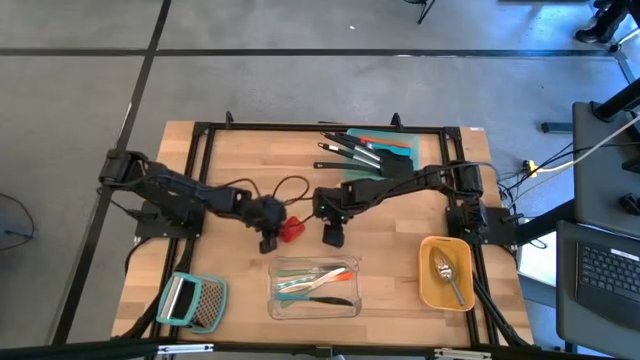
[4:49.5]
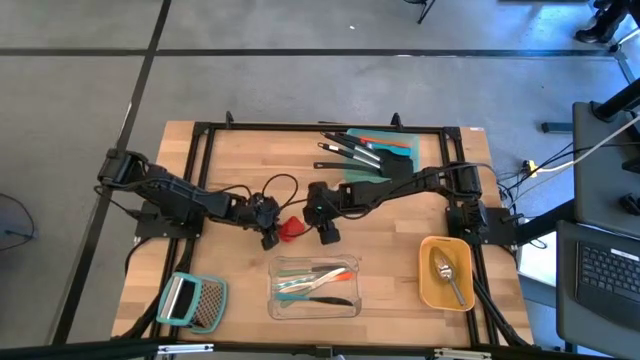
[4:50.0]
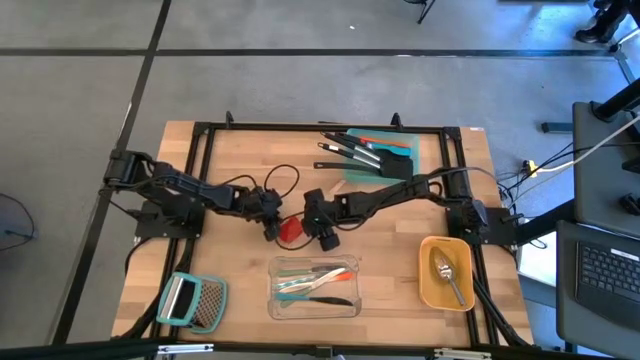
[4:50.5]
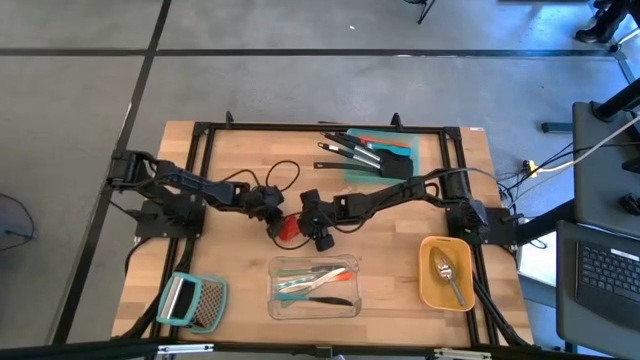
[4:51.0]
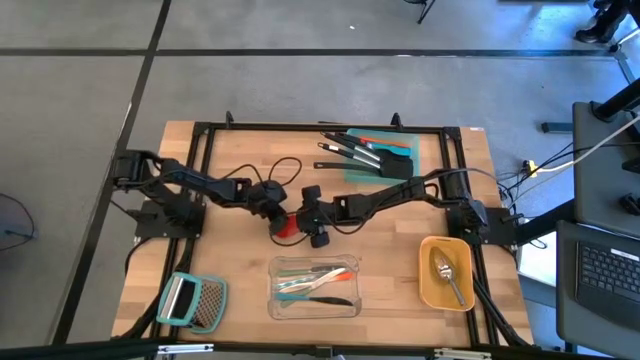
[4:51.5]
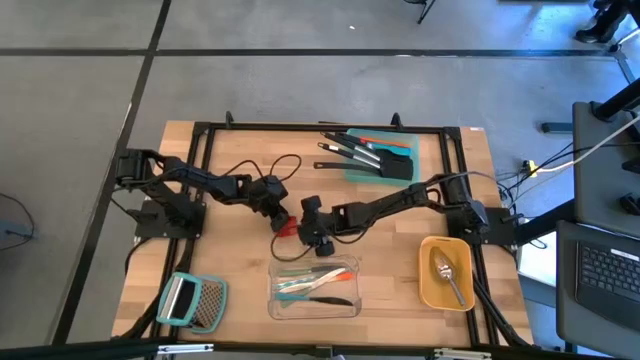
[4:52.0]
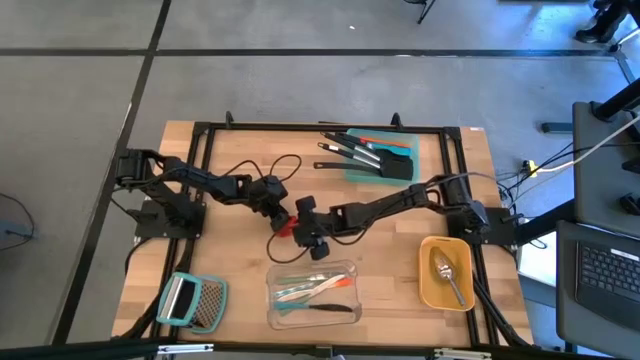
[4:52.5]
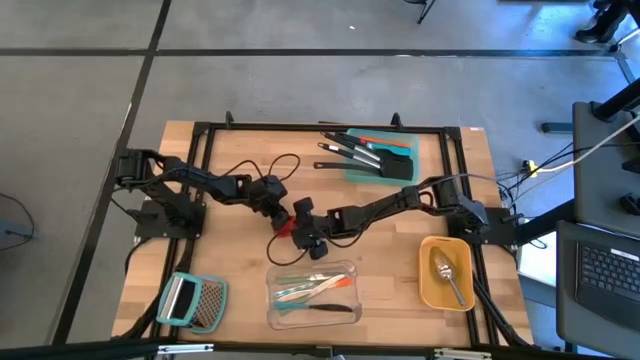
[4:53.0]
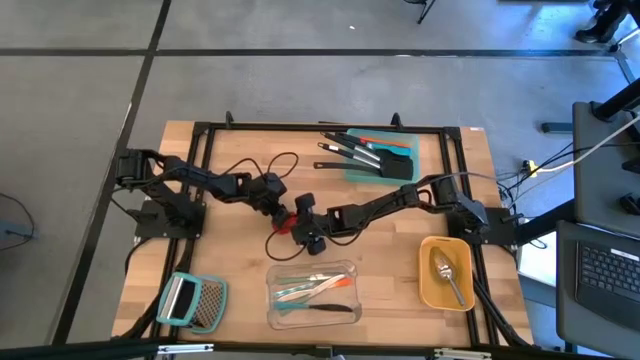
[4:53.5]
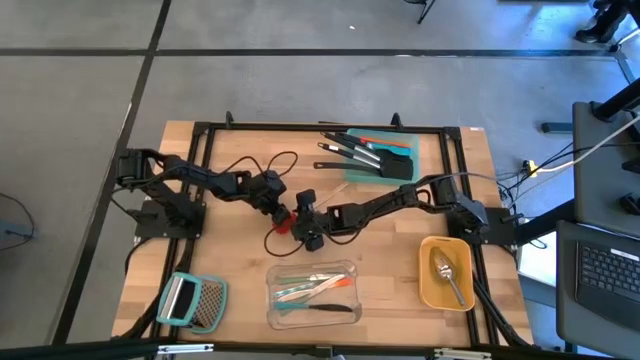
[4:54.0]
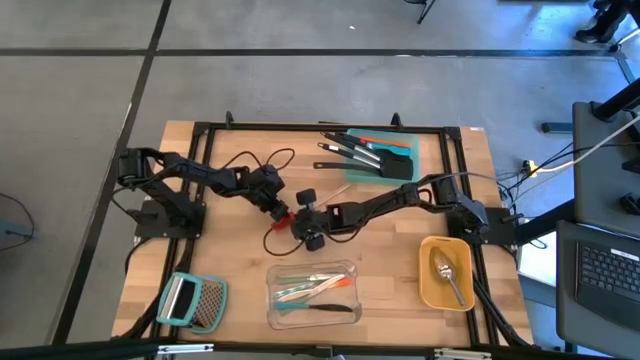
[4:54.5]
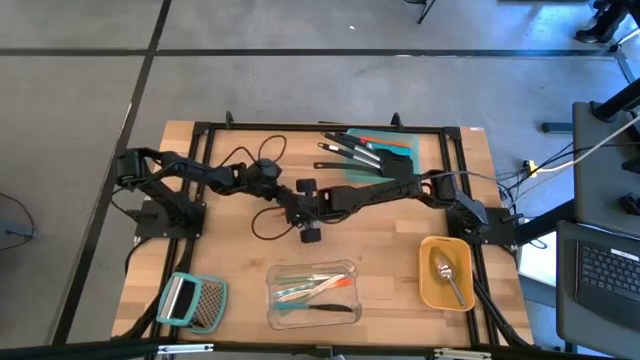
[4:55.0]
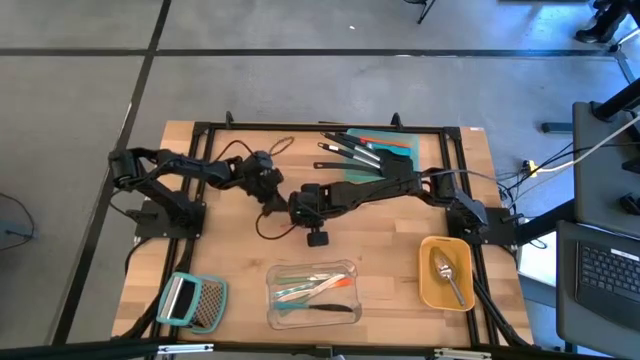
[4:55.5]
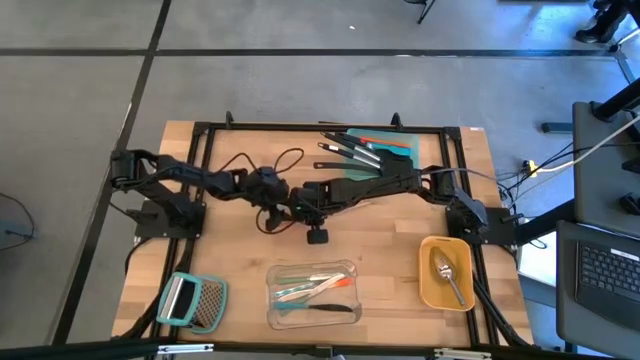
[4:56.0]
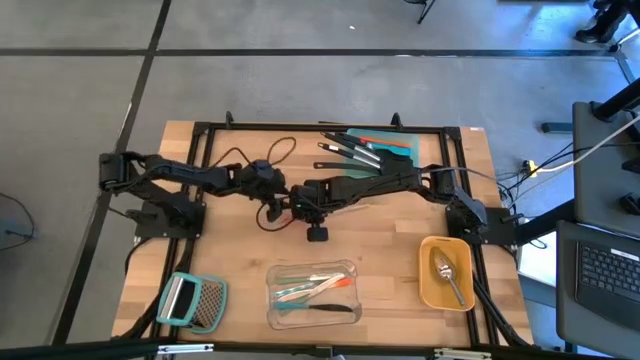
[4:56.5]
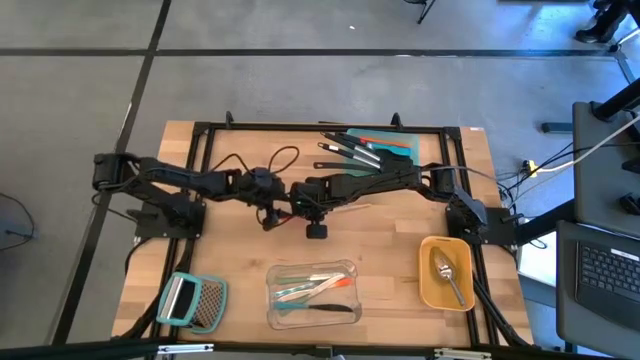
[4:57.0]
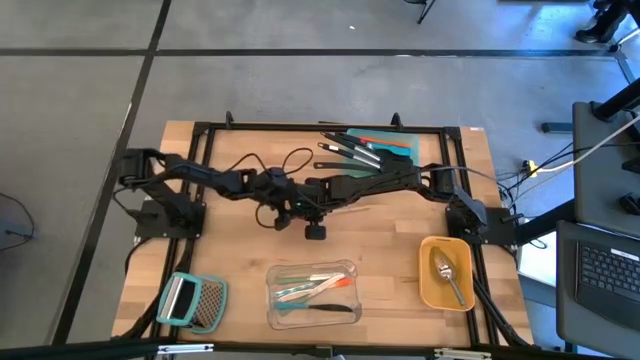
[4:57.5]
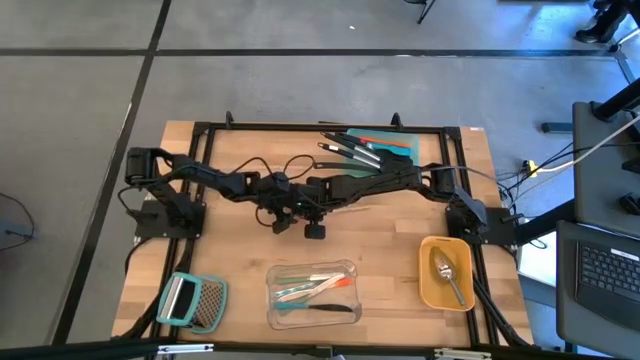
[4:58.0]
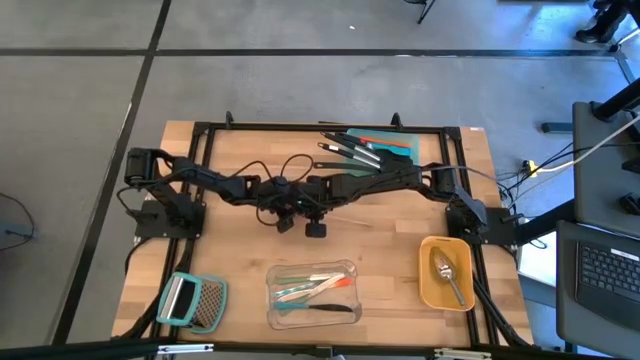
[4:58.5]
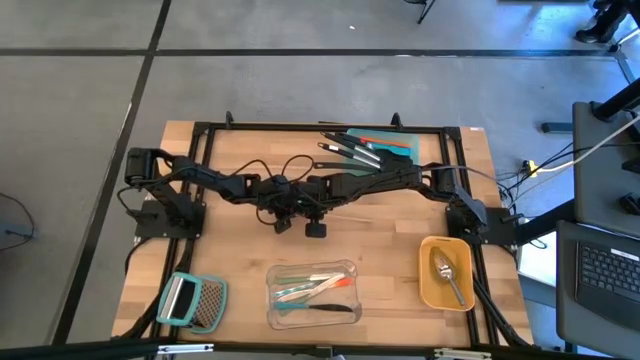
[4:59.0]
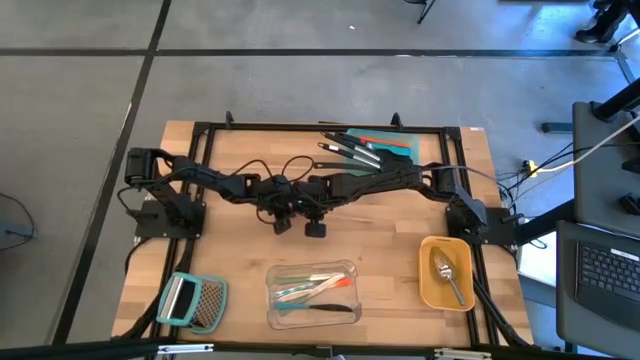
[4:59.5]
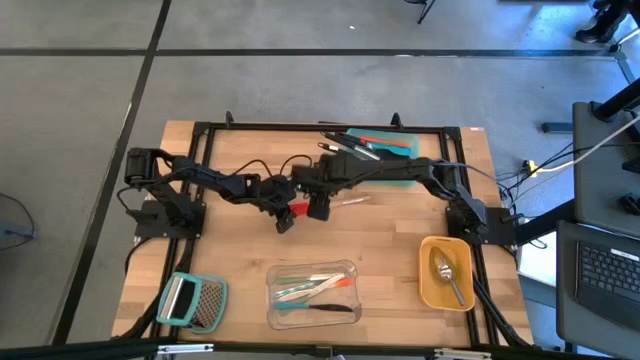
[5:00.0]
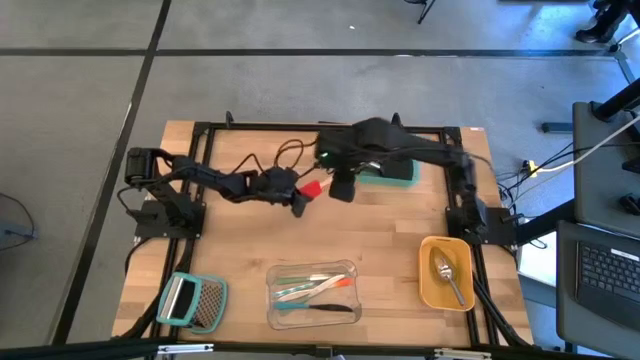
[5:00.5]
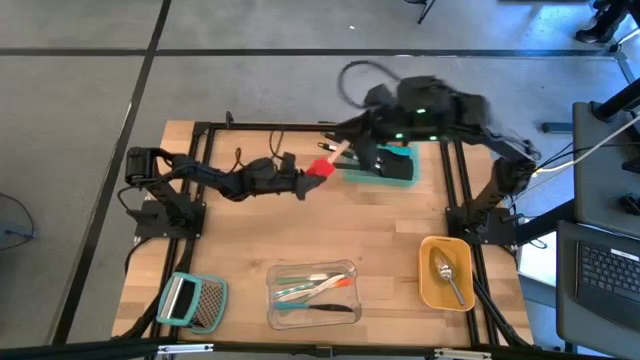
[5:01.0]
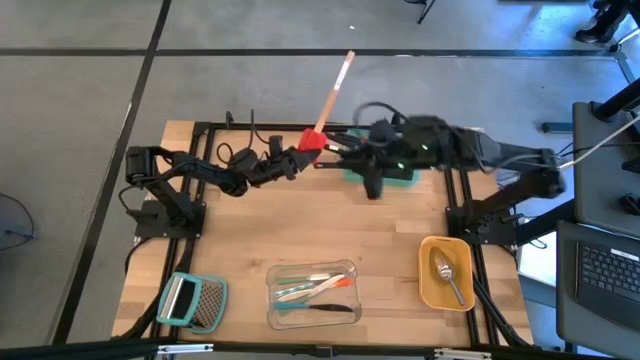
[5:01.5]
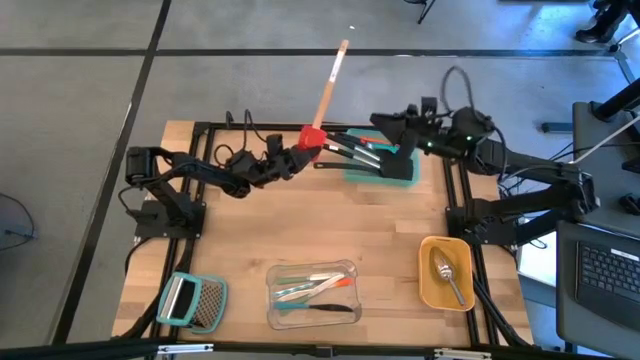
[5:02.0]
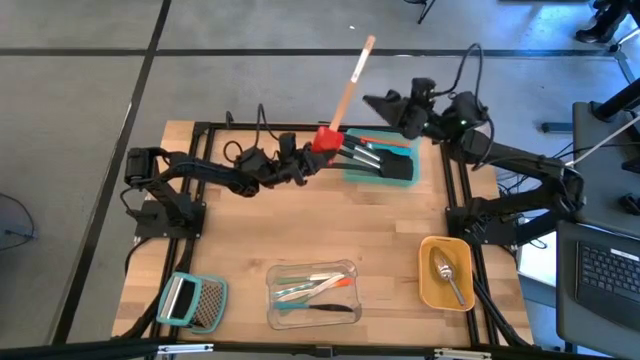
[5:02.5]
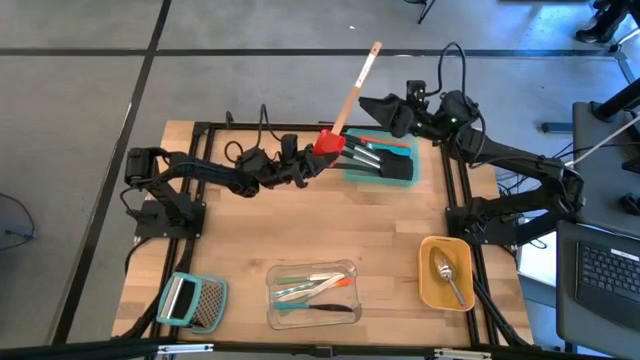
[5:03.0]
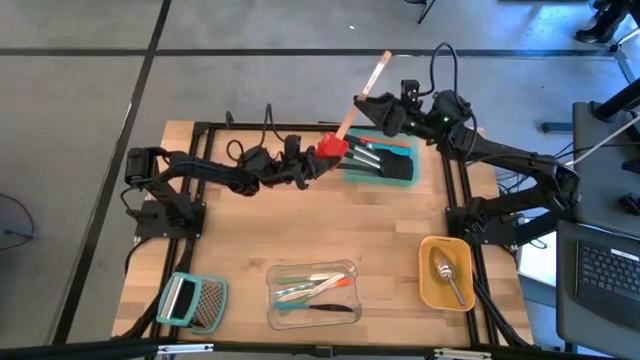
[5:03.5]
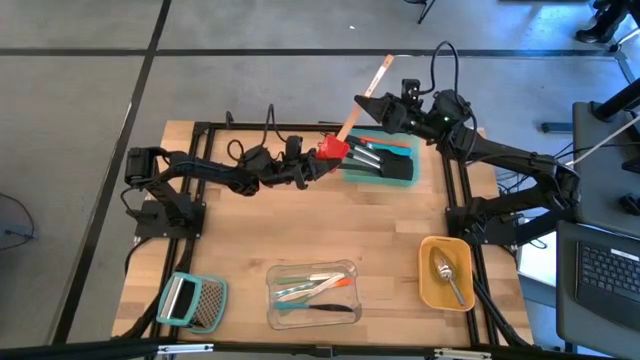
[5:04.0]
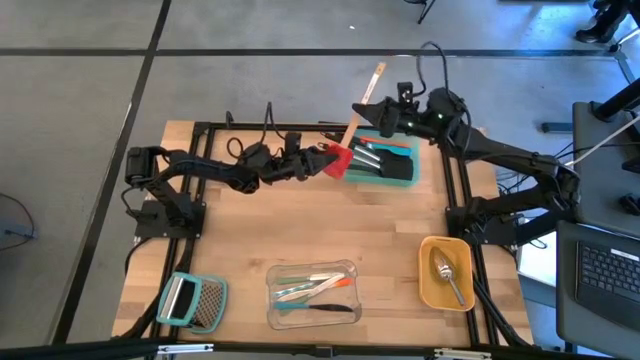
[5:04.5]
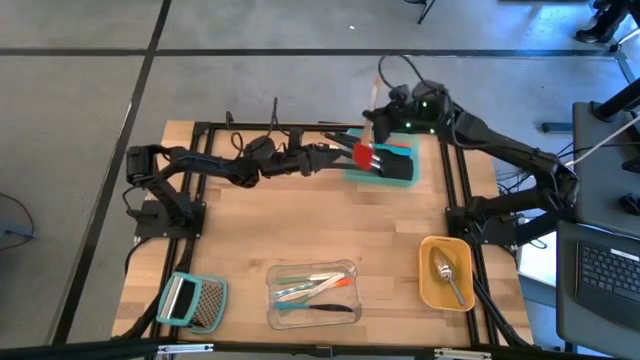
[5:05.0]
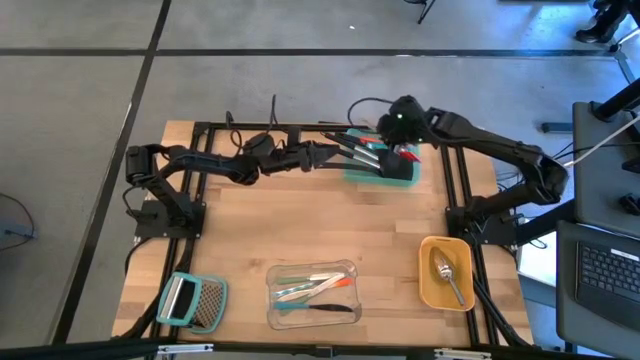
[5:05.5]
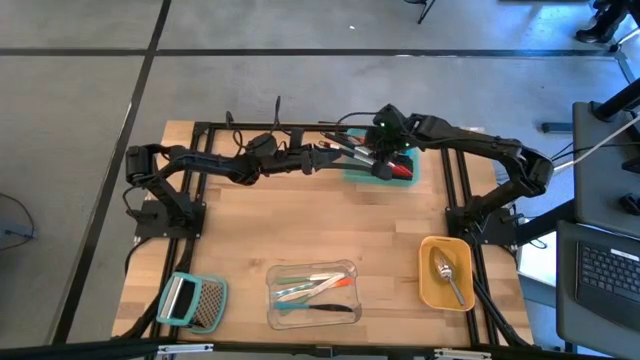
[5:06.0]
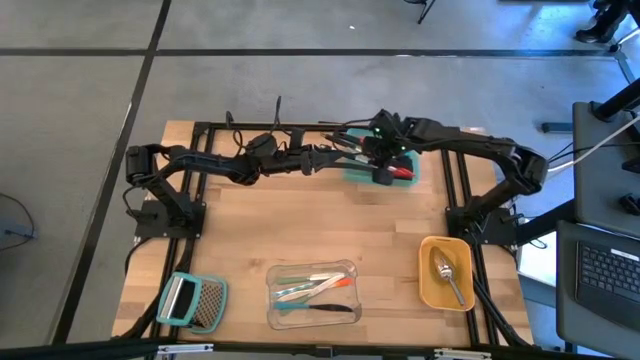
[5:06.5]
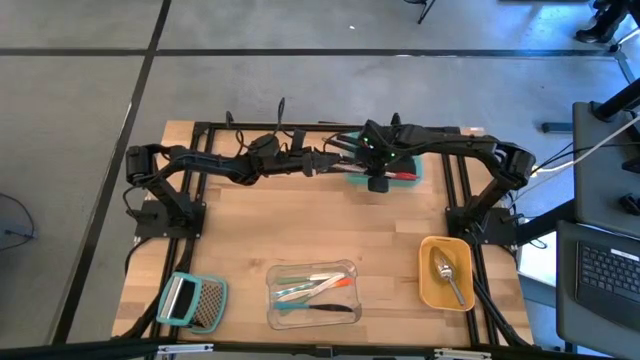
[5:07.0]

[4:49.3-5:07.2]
Task: Pick & Place Kitchen Items
Put the red spatula into the green bin

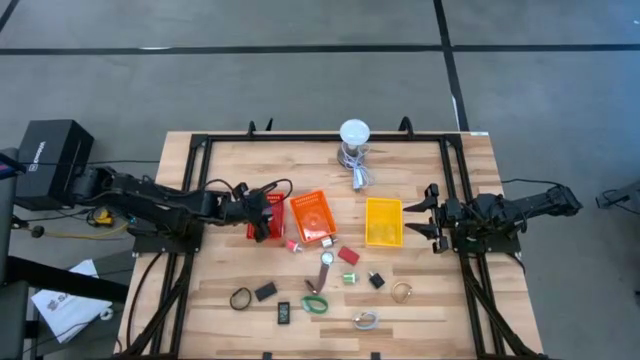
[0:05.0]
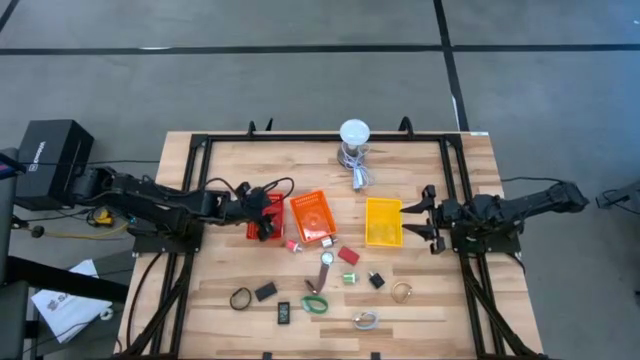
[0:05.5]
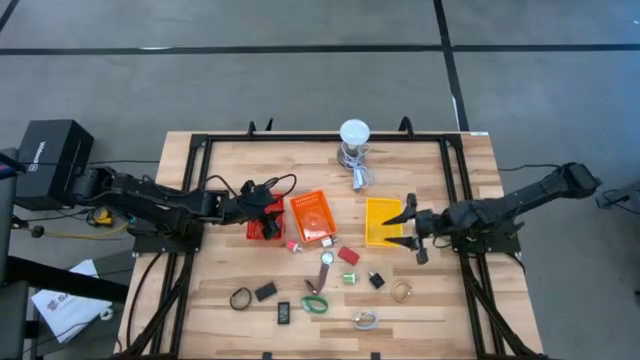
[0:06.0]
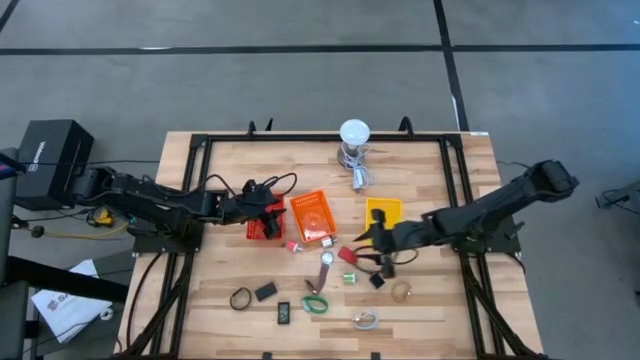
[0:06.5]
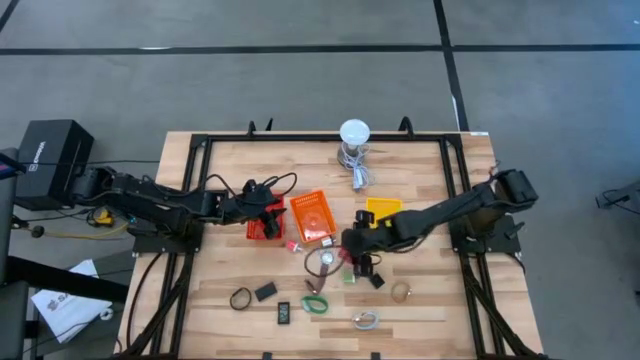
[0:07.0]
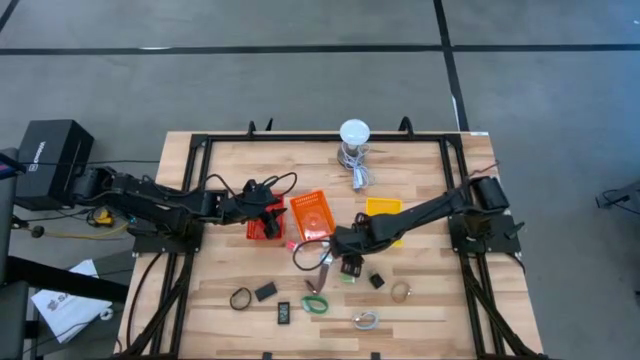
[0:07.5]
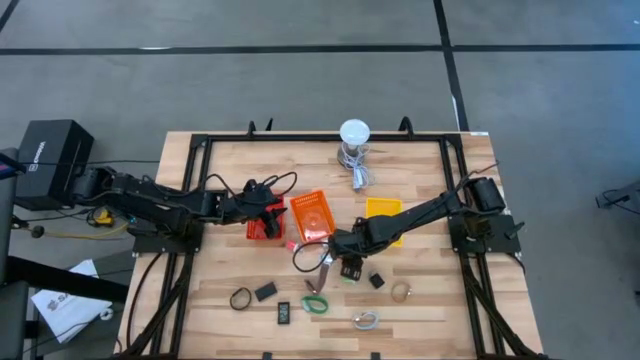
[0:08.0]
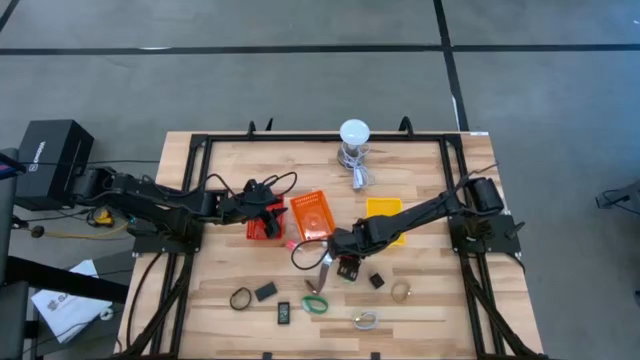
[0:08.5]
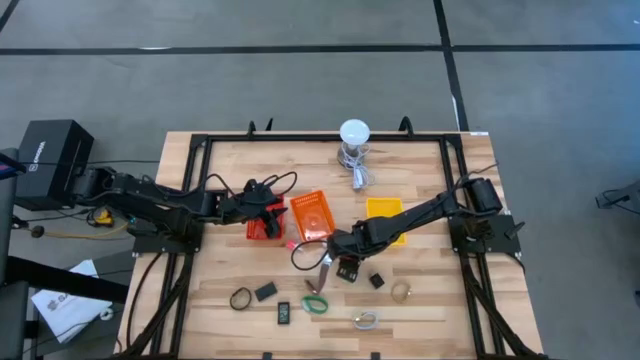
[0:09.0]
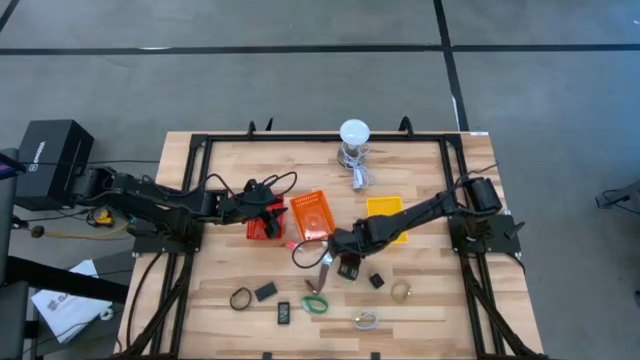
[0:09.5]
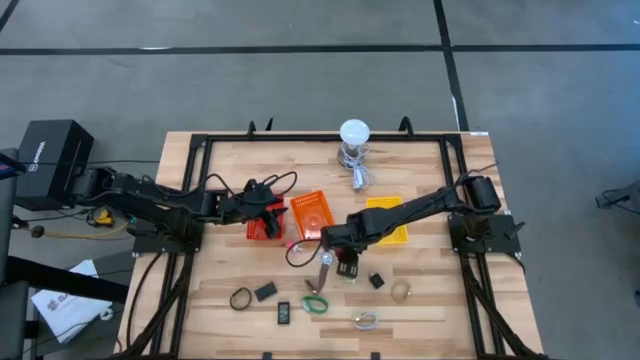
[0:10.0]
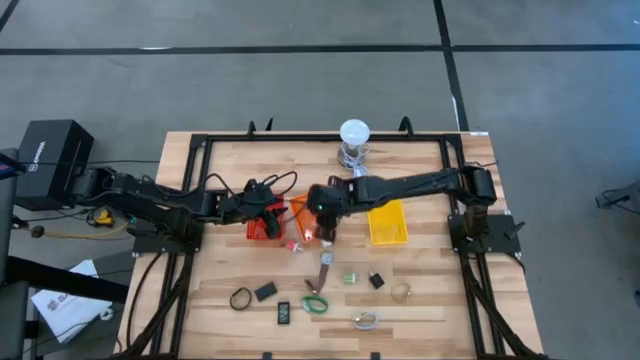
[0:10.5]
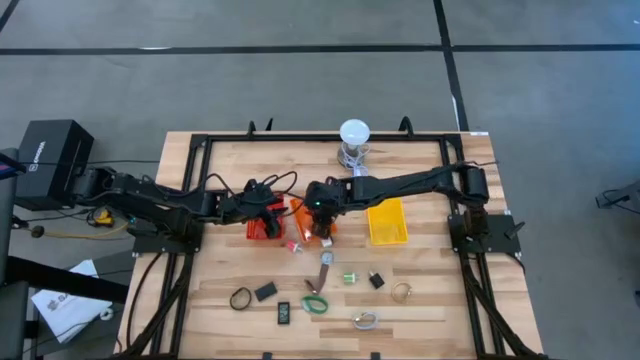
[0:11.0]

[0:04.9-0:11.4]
Task: Pick & Place Office items
Put the red digital clock into the orange bin
